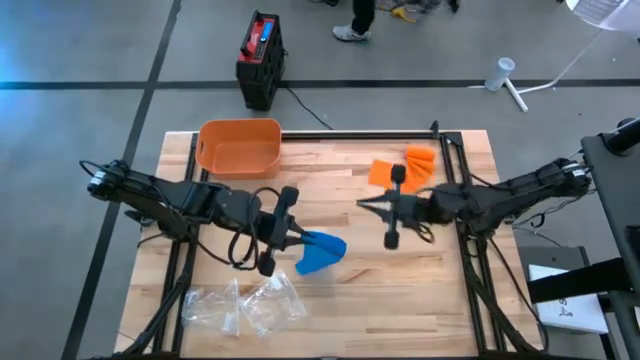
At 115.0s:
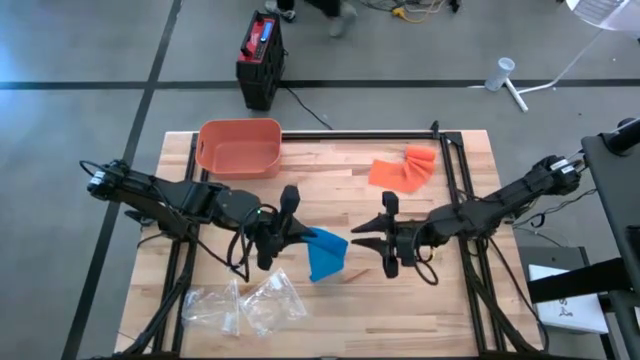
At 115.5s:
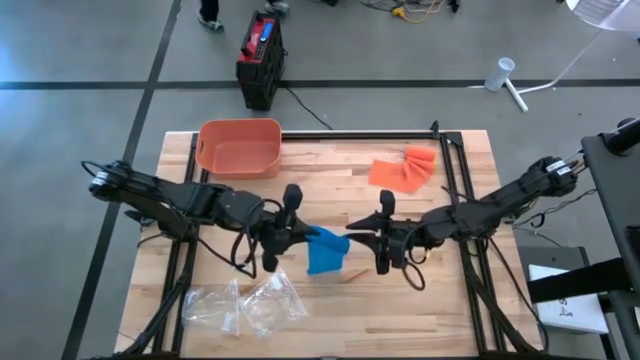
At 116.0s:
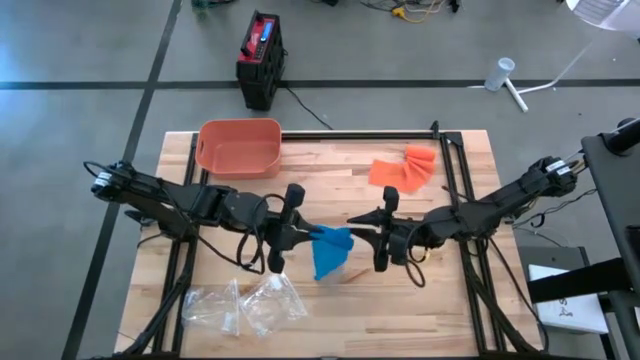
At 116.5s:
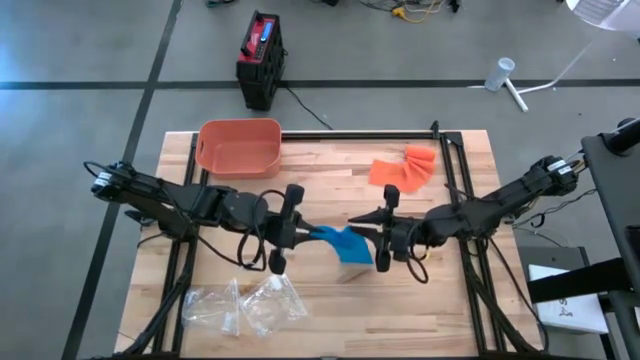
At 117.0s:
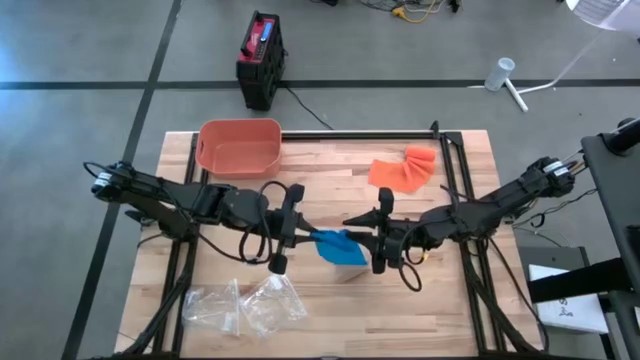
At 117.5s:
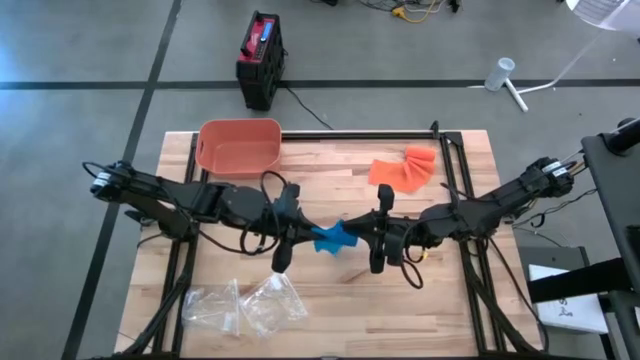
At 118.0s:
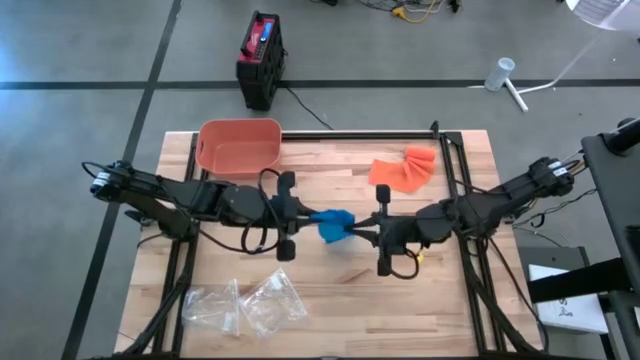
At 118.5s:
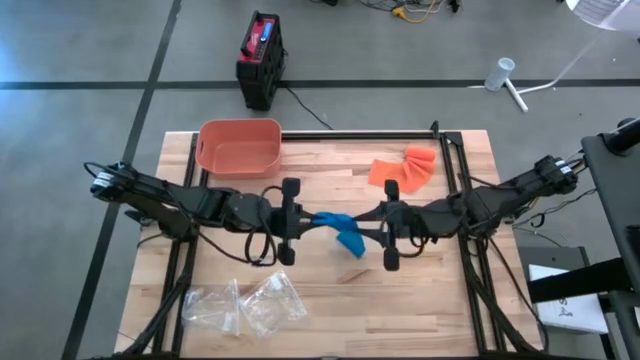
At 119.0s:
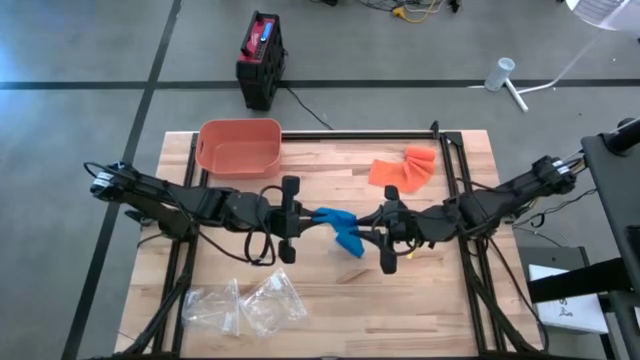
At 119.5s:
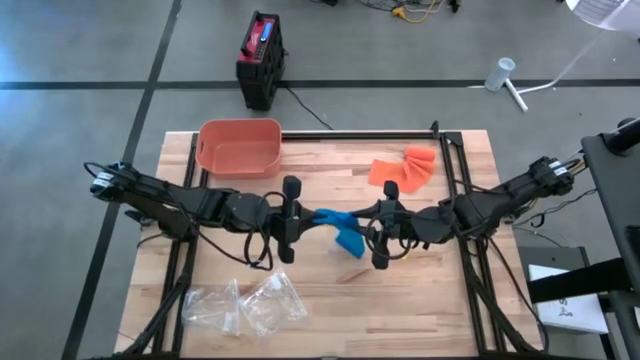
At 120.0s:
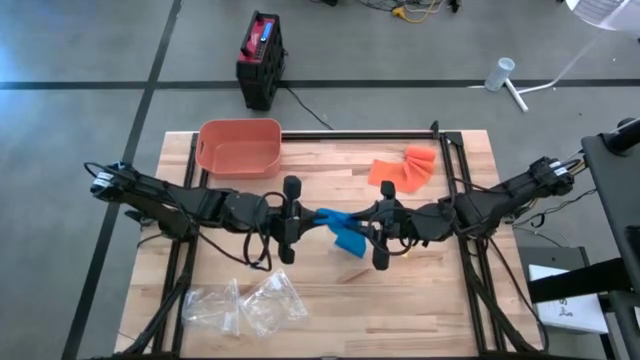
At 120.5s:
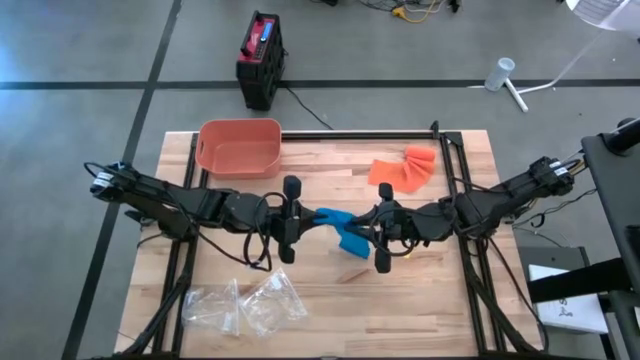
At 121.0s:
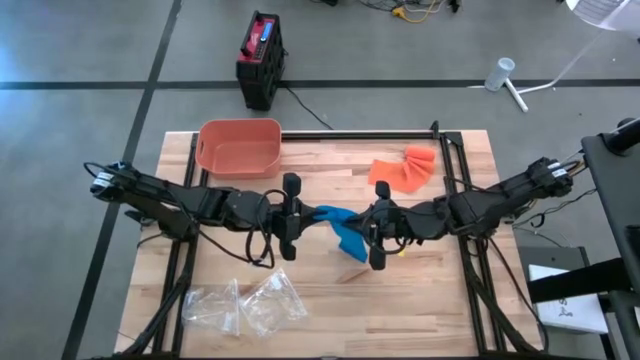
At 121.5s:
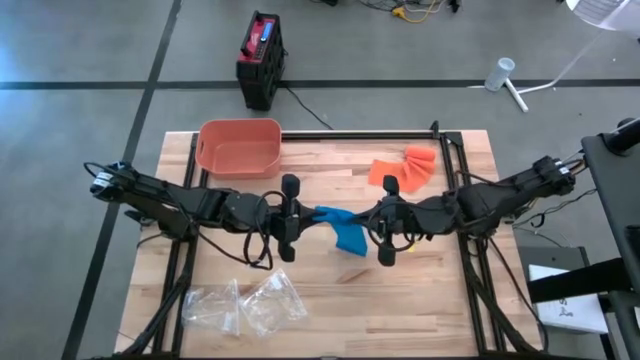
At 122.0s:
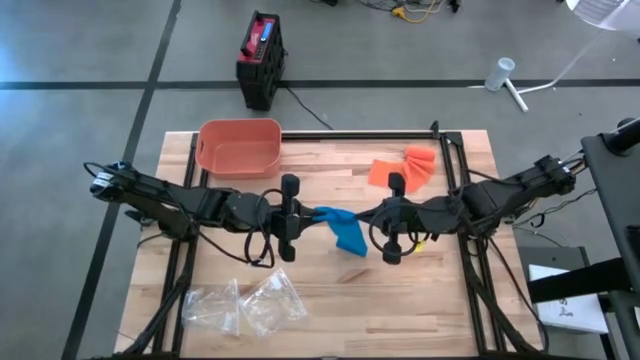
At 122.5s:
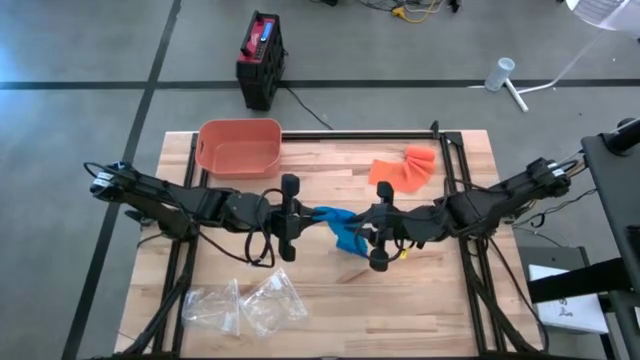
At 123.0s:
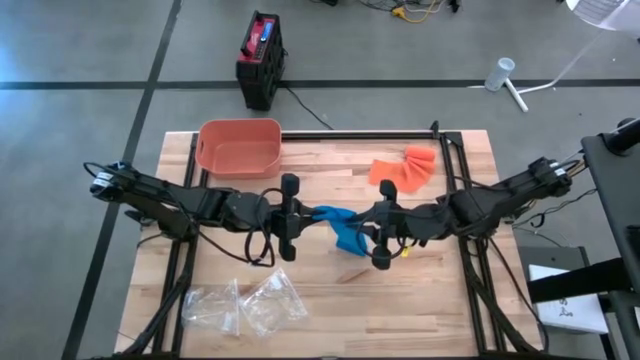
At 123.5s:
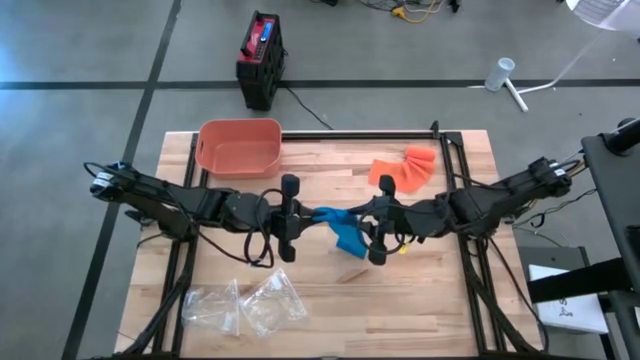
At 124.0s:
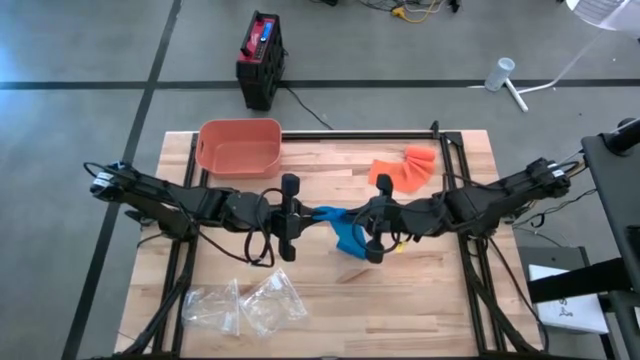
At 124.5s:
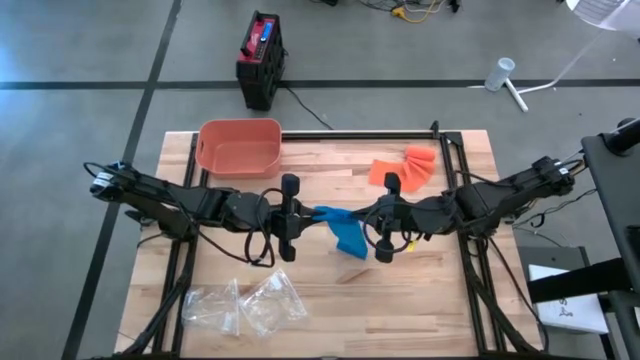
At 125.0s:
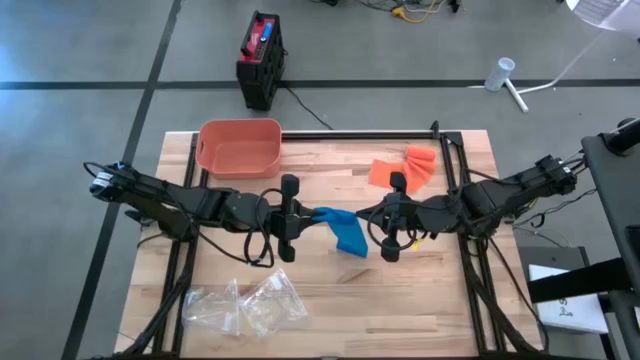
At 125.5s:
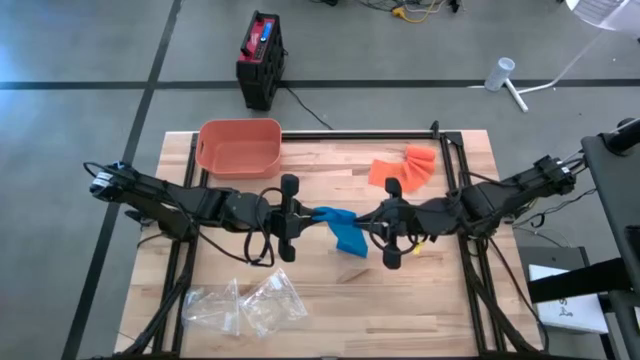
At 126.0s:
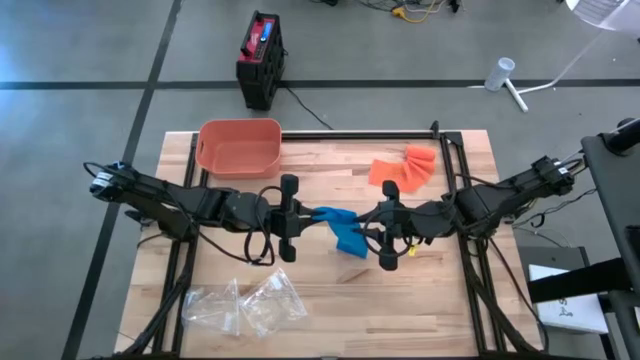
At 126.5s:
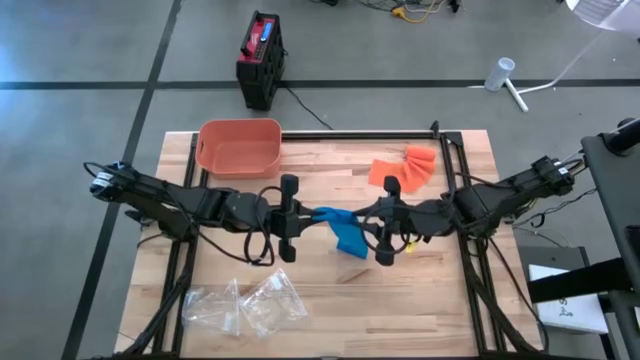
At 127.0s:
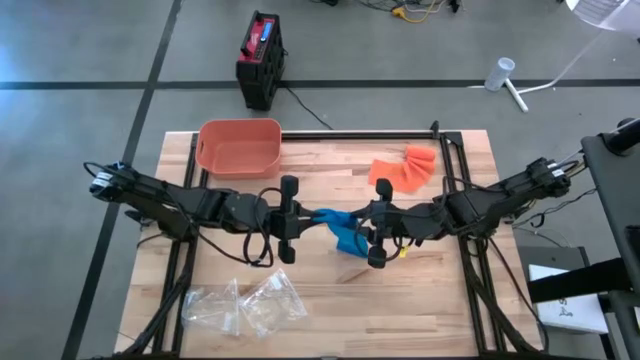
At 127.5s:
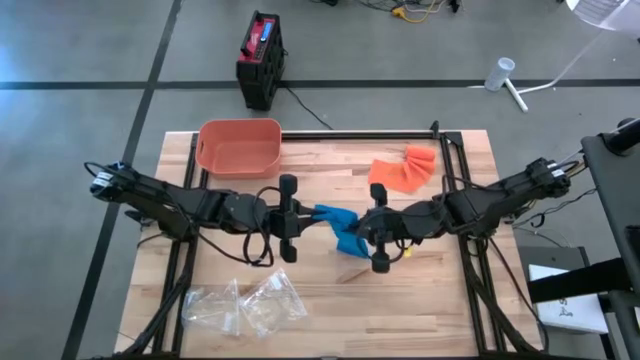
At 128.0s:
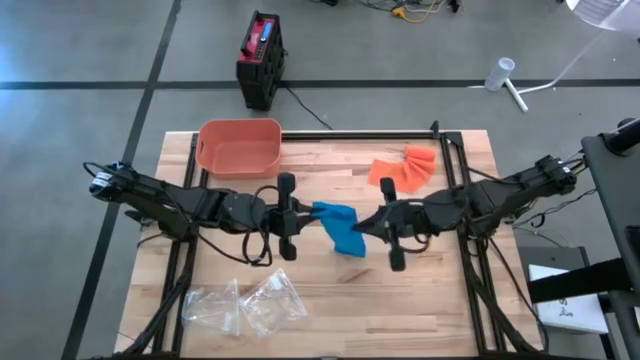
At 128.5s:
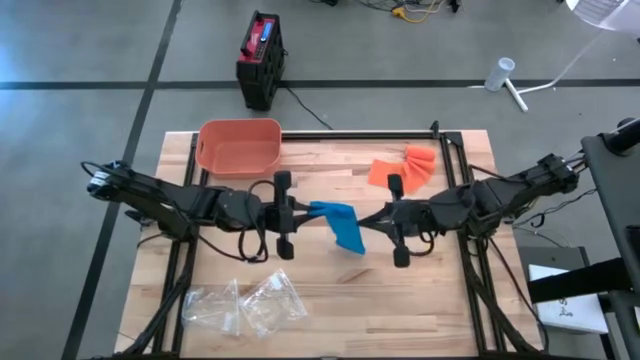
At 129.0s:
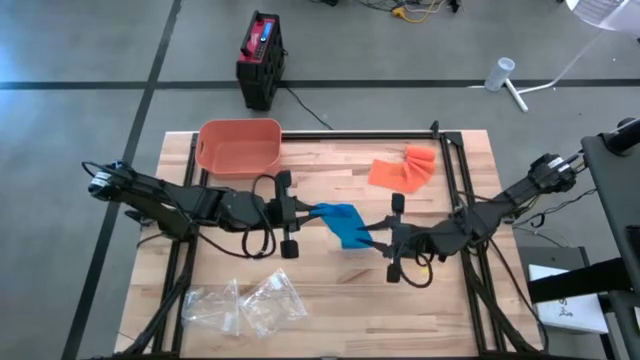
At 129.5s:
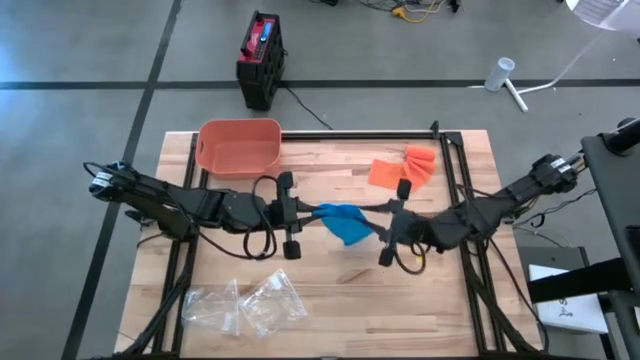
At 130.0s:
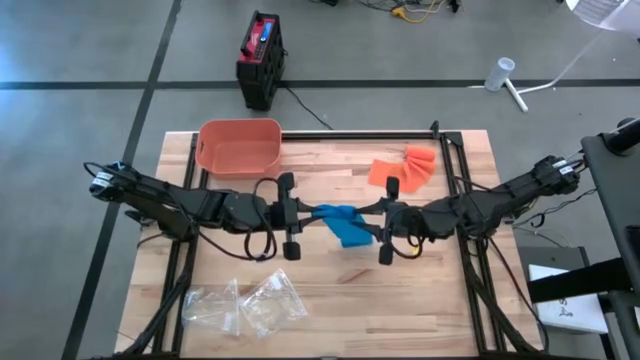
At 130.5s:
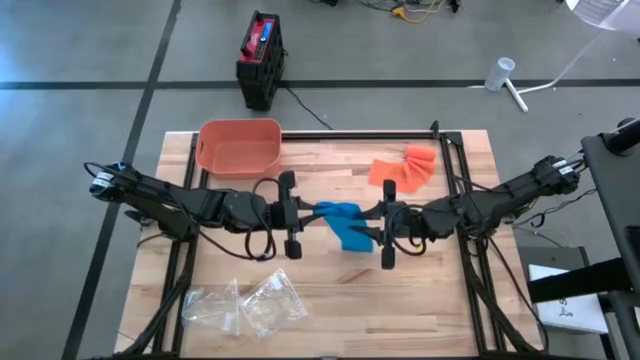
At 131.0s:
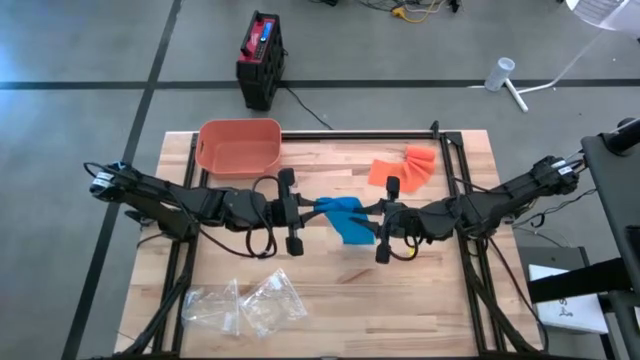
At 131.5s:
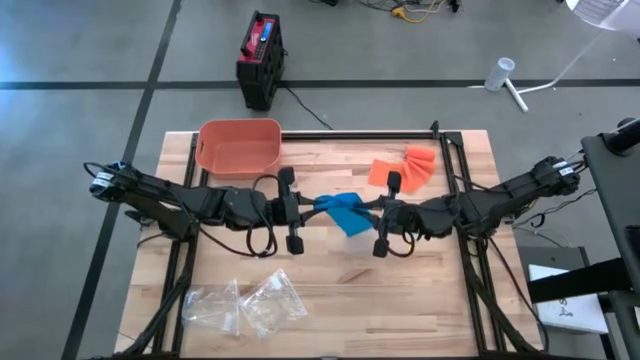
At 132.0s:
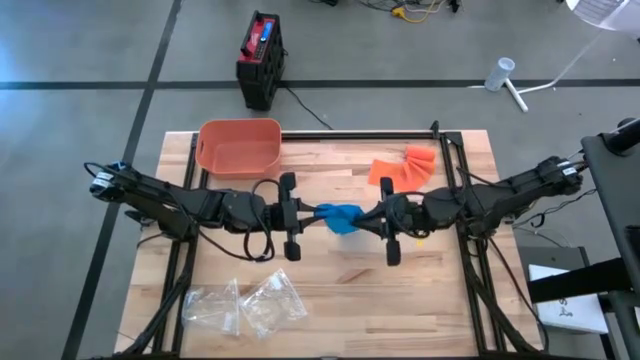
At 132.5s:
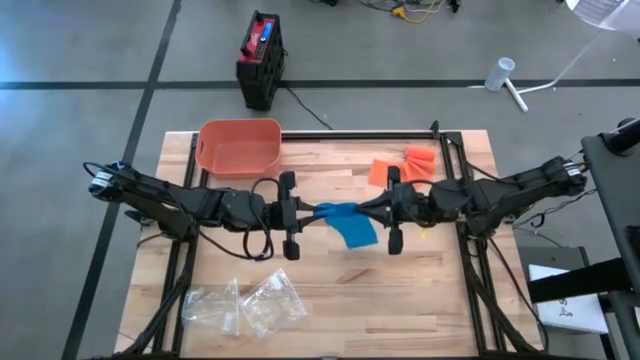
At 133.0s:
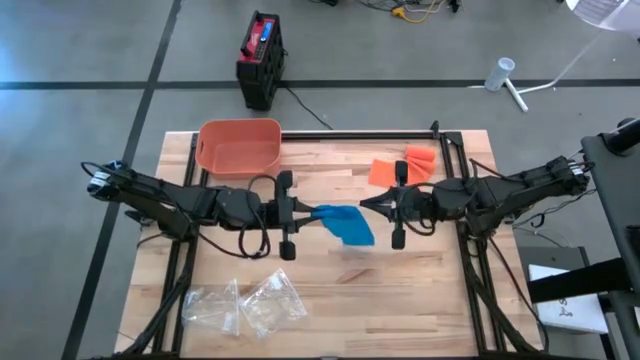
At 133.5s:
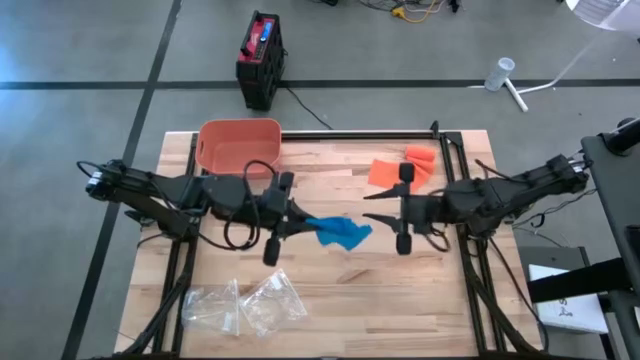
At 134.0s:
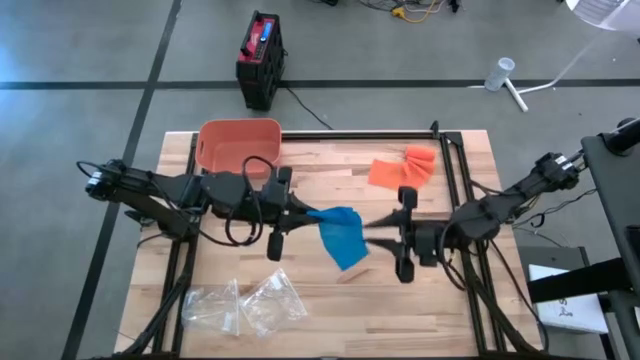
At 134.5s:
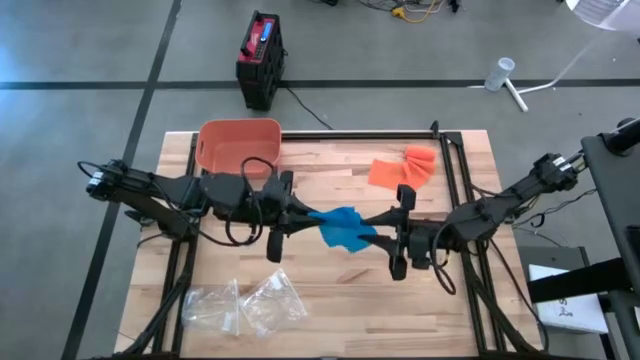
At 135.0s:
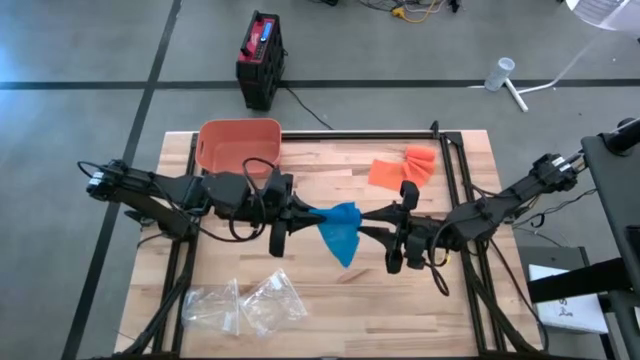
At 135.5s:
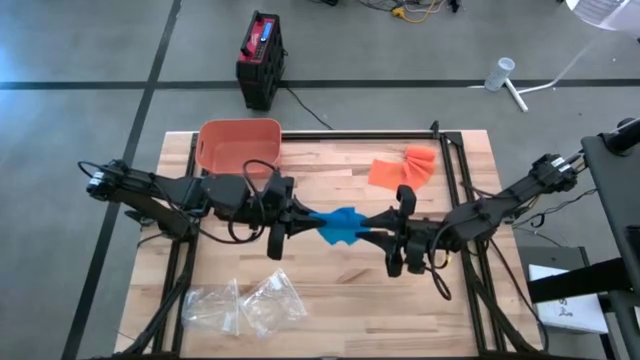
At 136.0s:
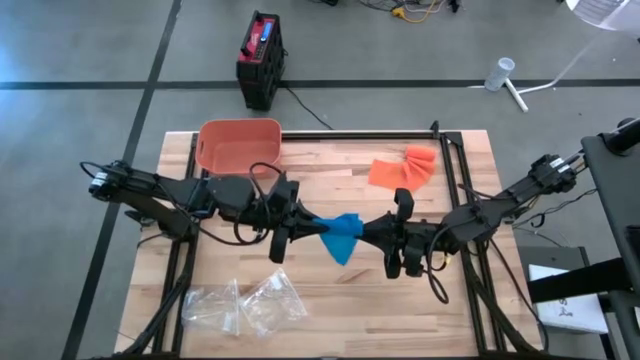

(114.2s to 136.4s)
Task: Roll bandage
Roll the blue bandage
